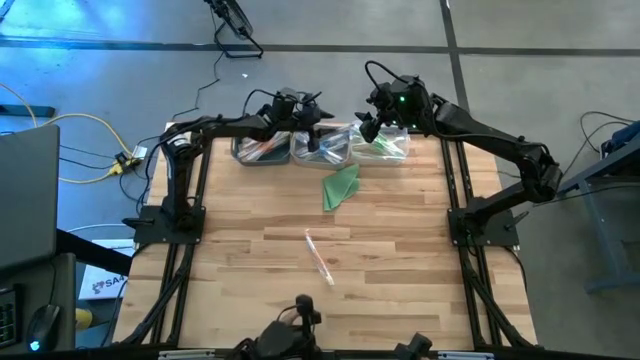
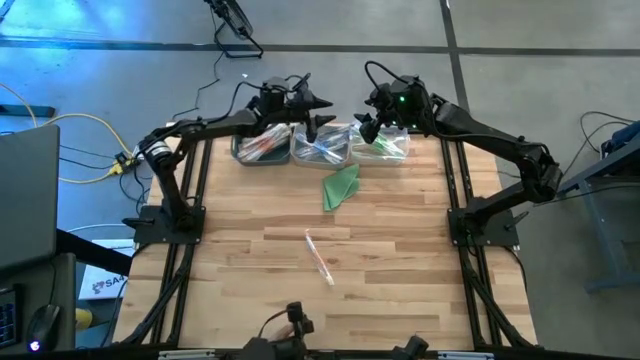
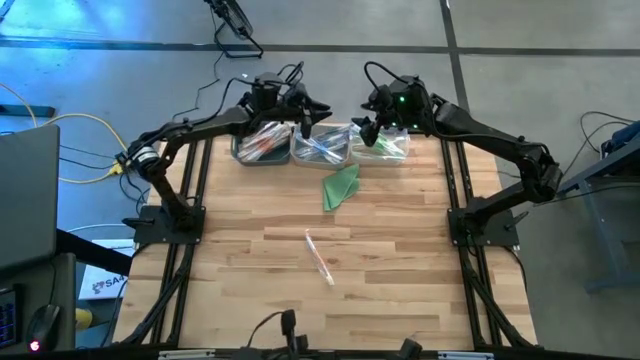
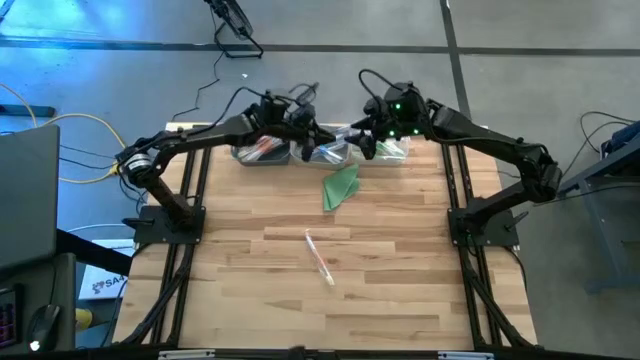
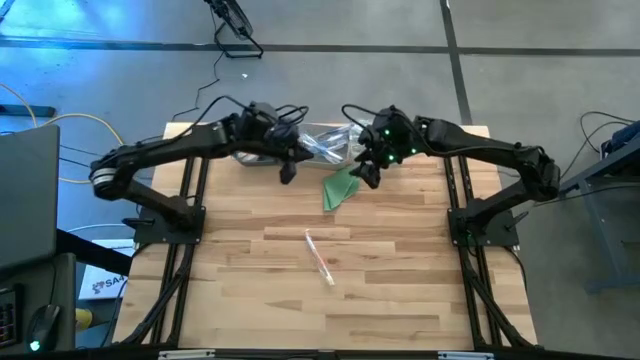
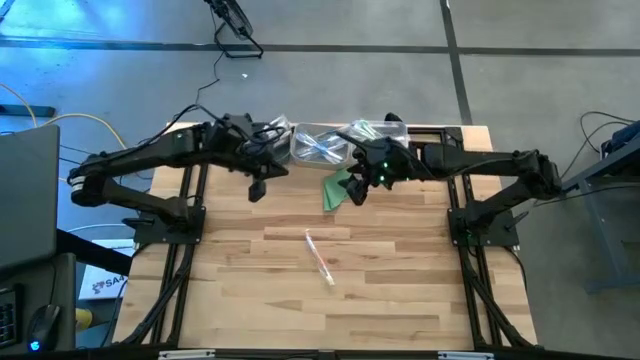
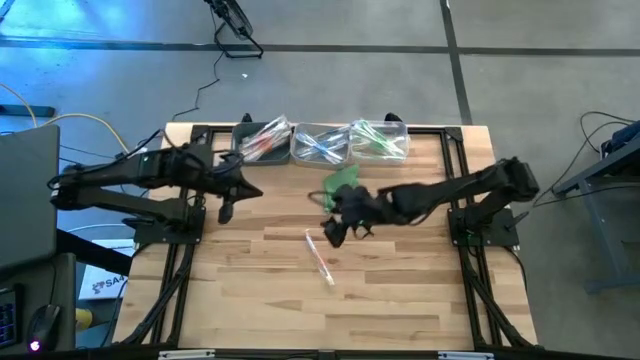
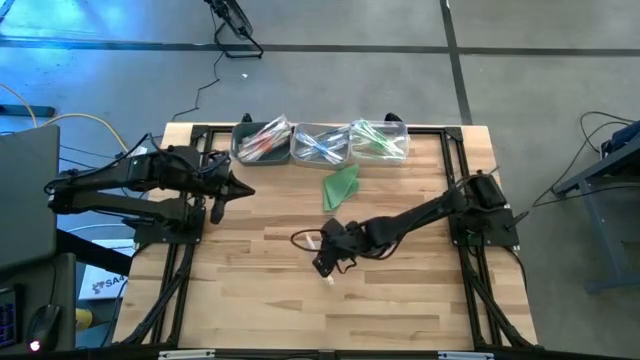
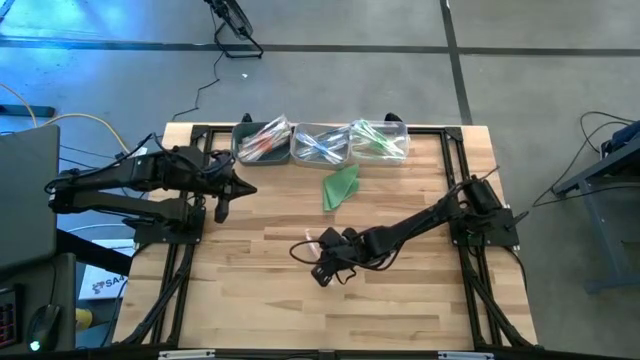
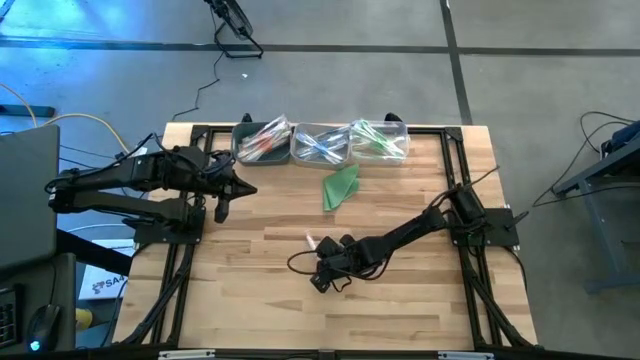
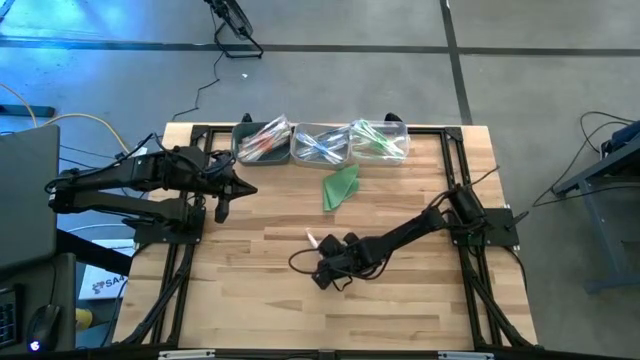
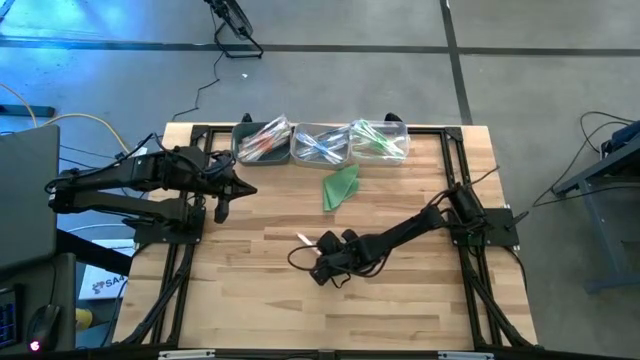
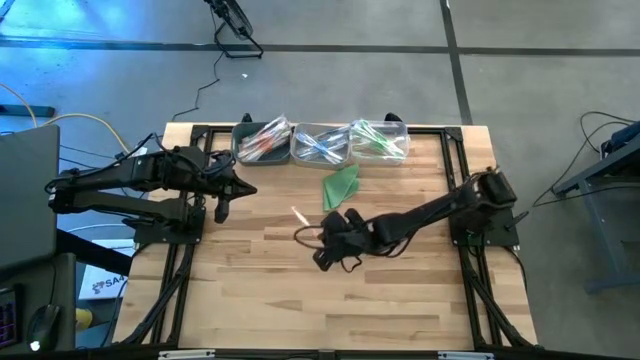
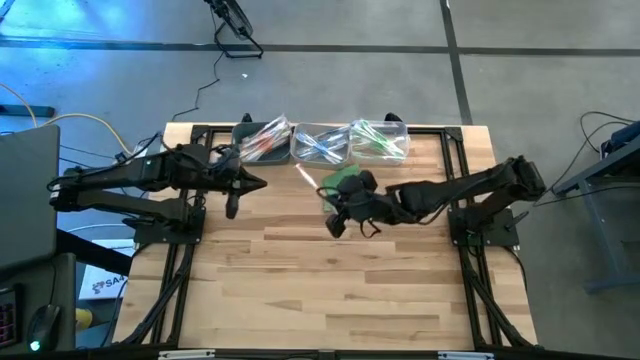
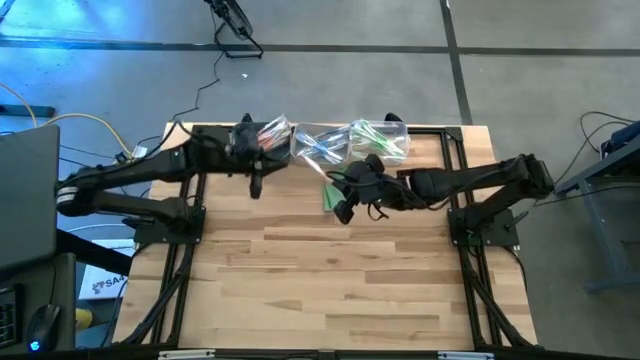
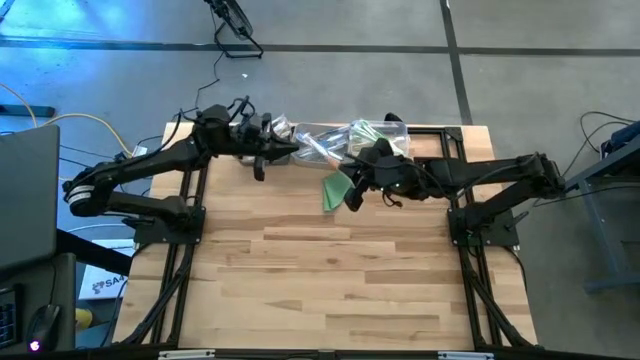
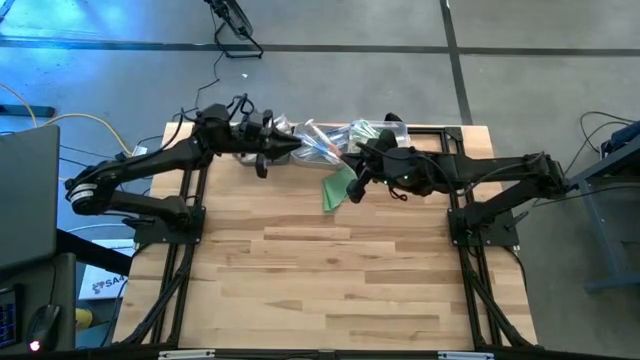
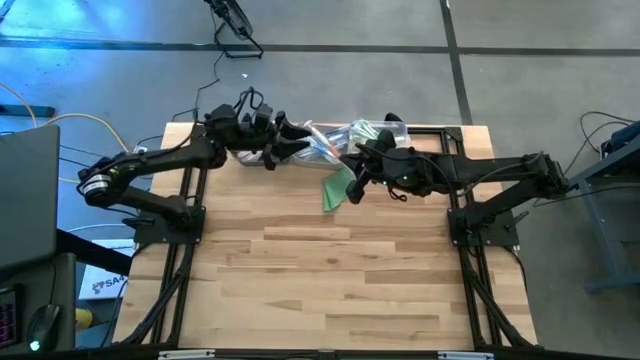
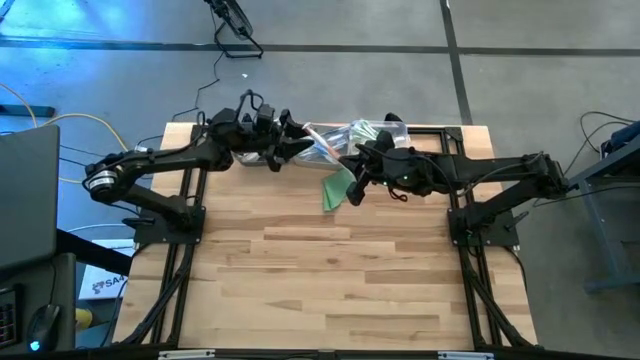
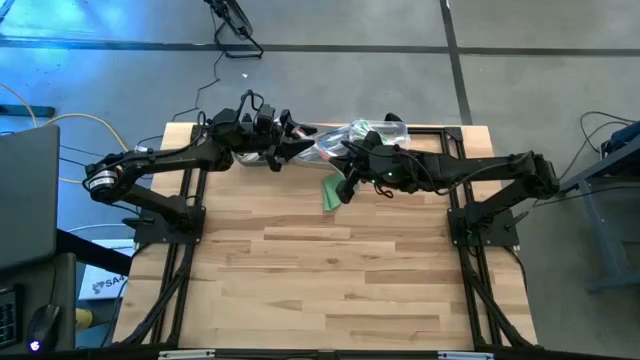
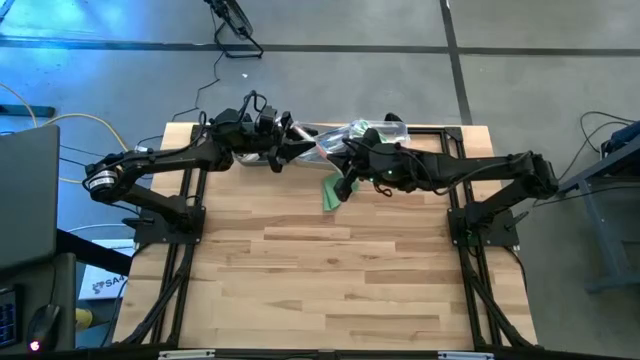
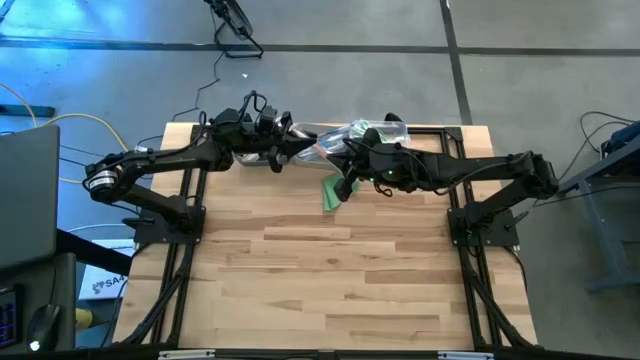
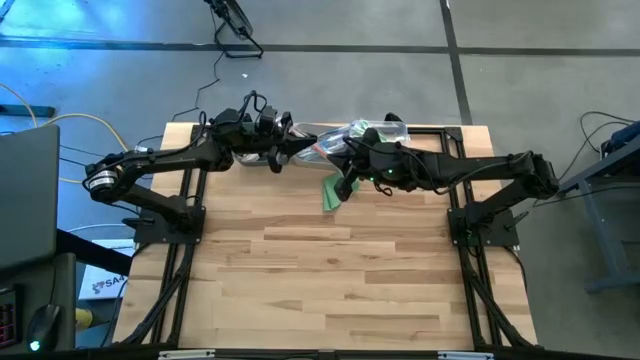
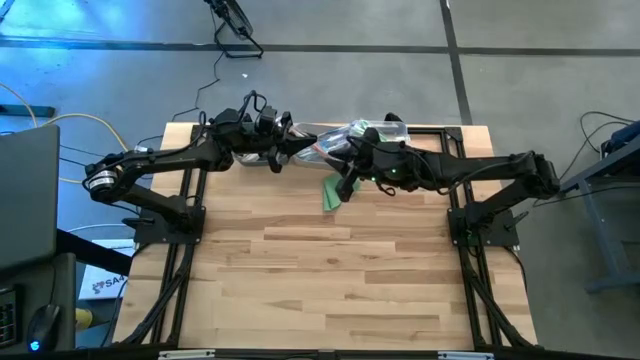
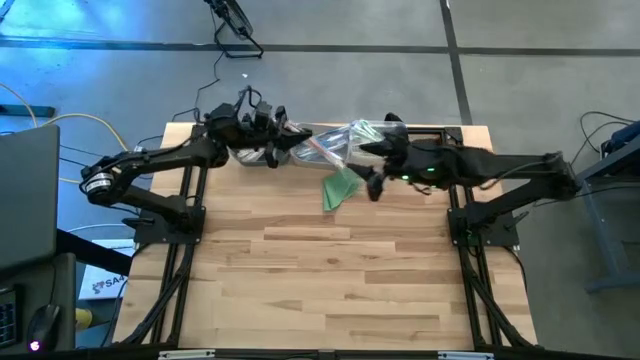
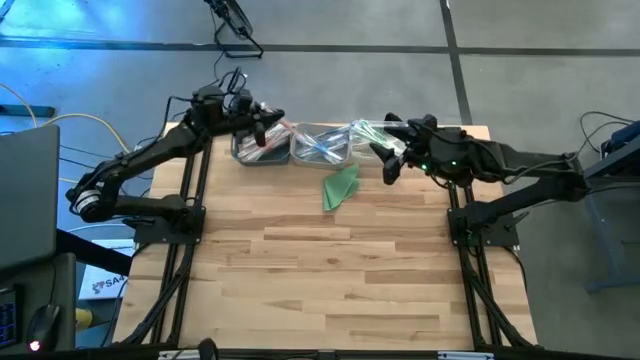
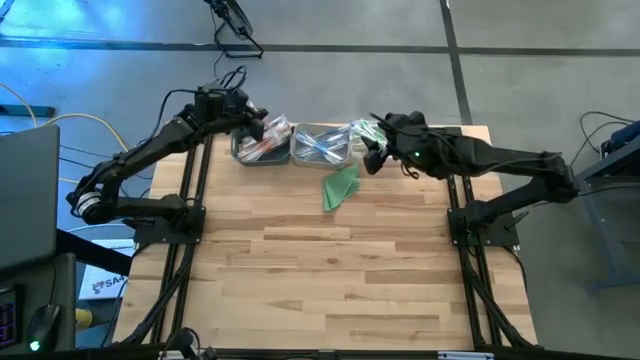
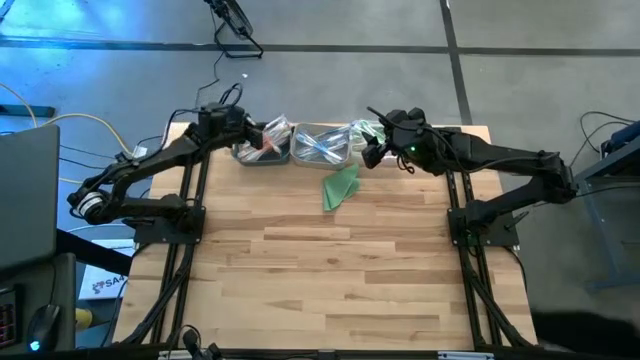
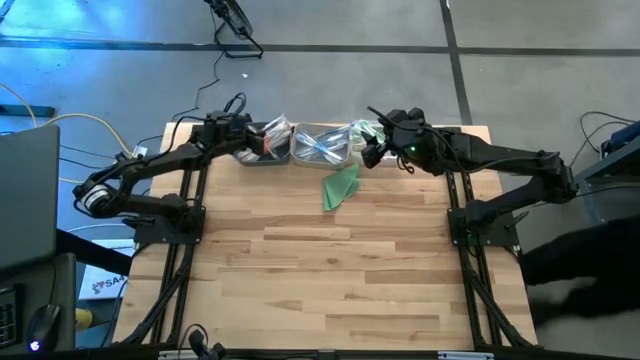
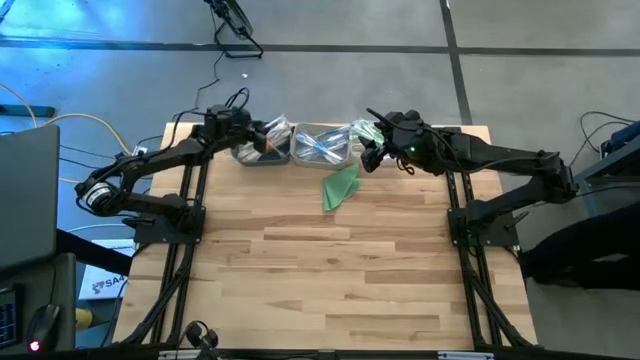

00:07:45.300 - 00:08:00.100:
Task: Pick & Place Toothbrushes
Put the orange toothbrush into the dark blue bin

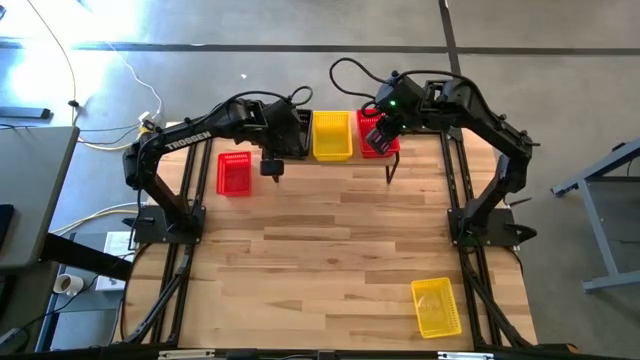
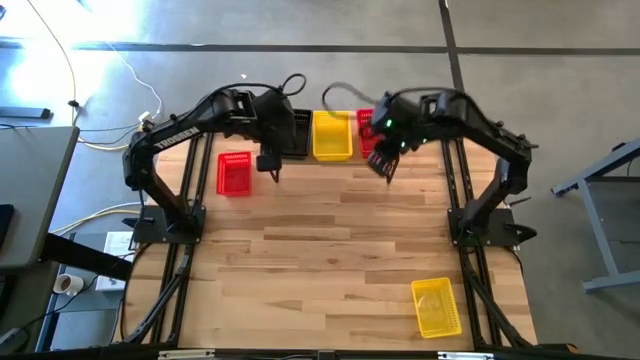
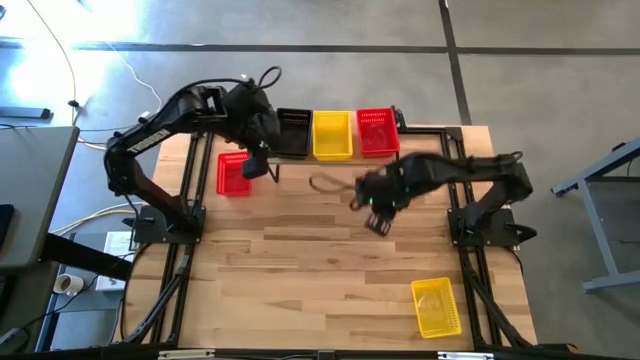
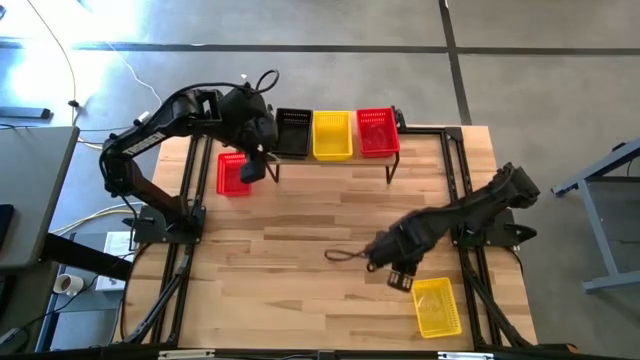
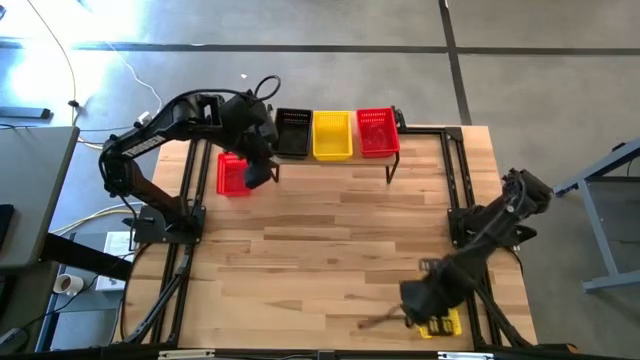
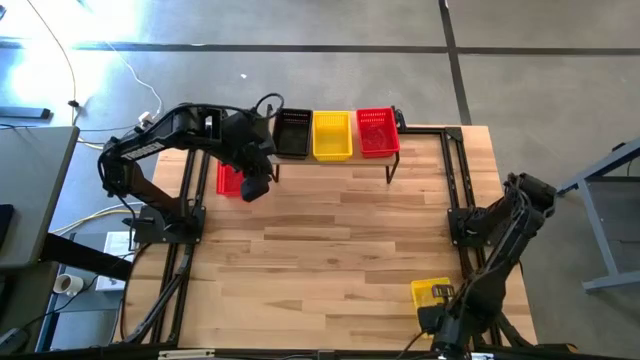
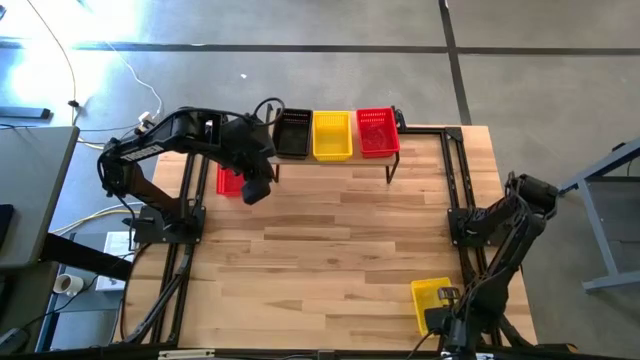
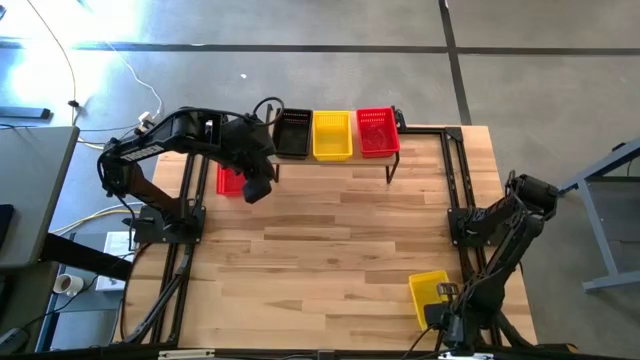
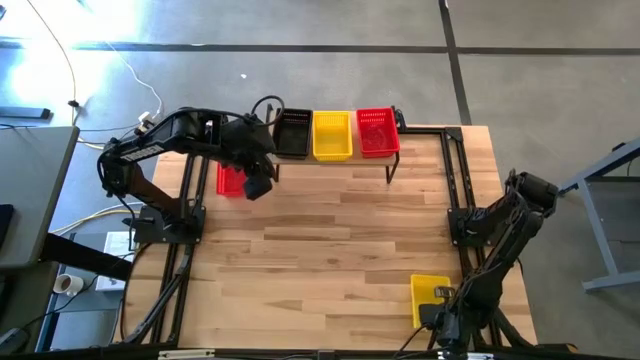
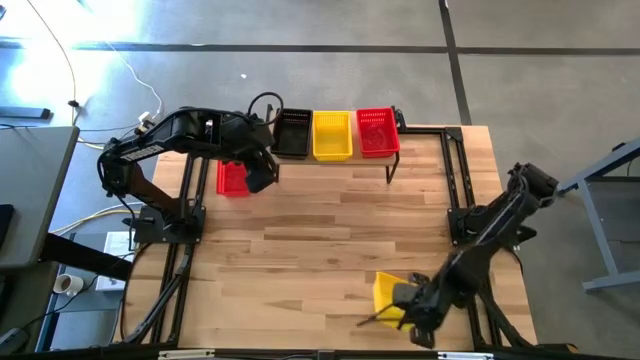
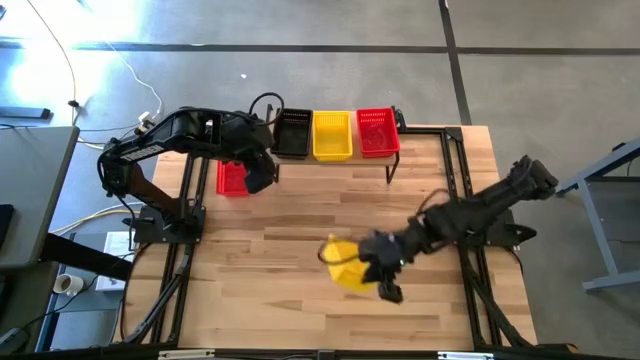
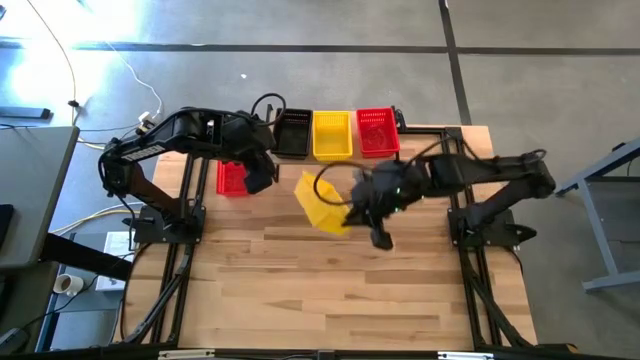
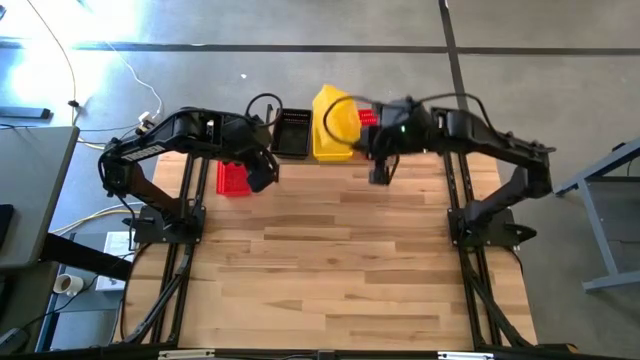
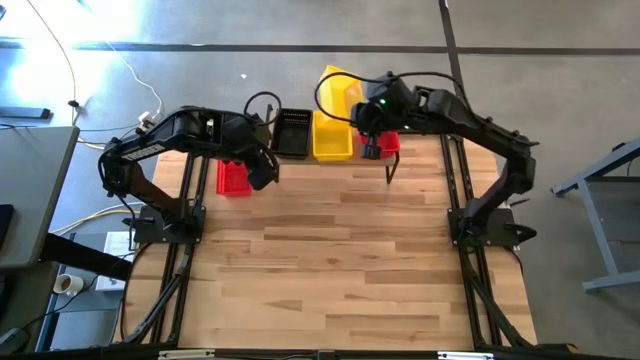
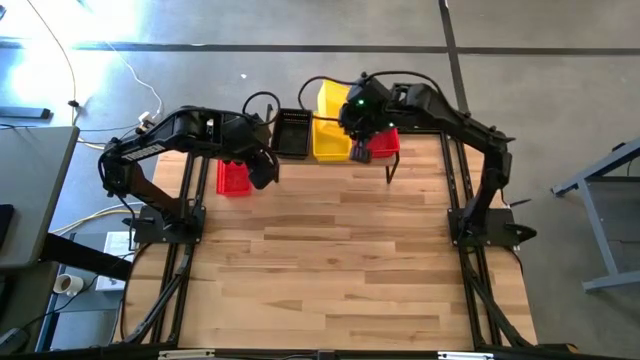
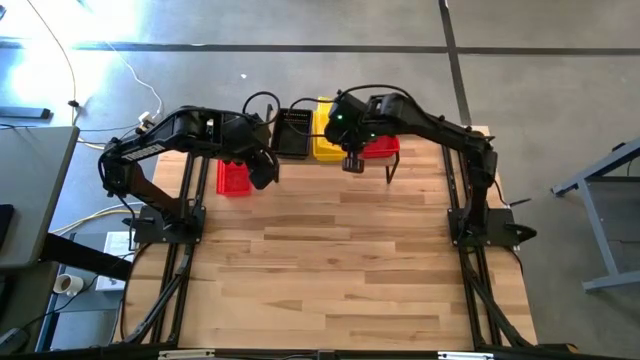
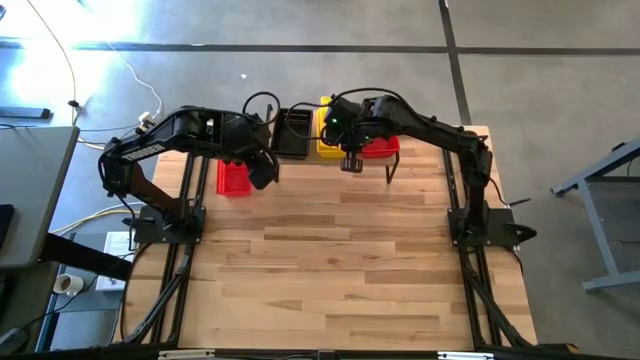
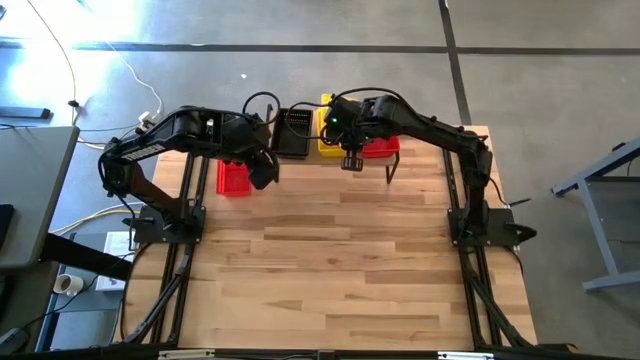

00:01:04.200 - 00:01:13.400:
Task: Stack baskets on shelf by color
Stack the yellow bin on top of the yellow bin on the shelf
